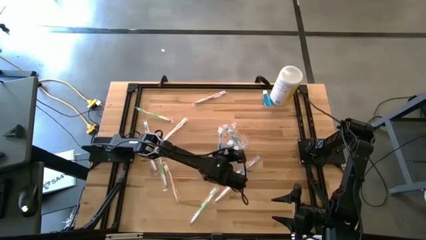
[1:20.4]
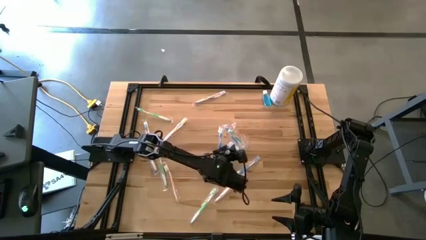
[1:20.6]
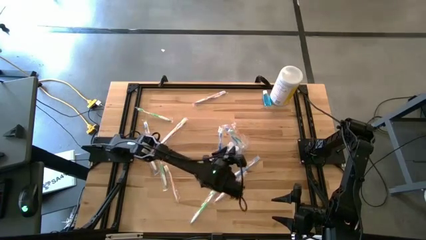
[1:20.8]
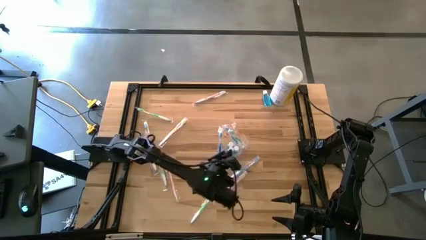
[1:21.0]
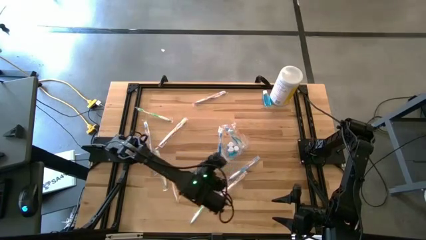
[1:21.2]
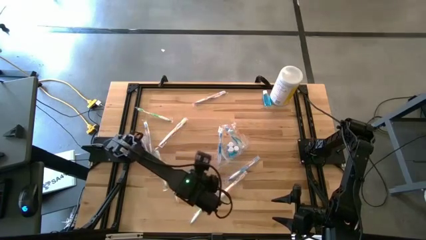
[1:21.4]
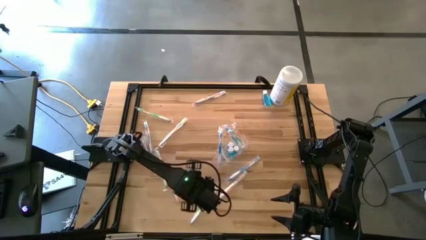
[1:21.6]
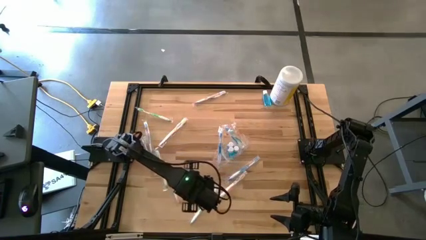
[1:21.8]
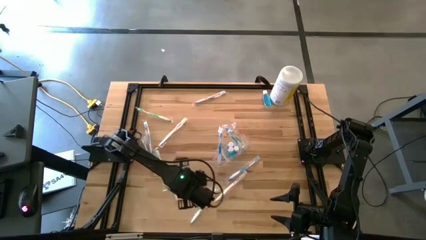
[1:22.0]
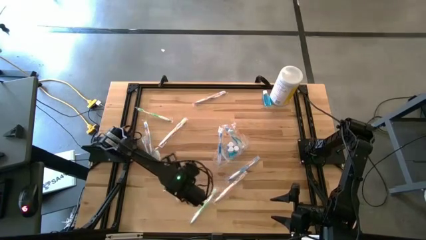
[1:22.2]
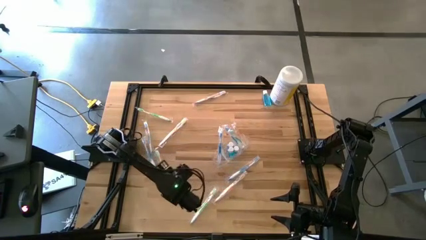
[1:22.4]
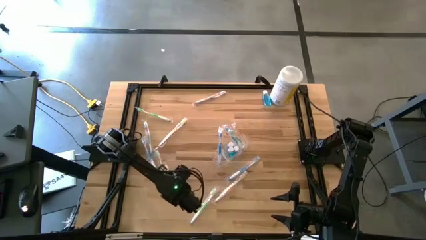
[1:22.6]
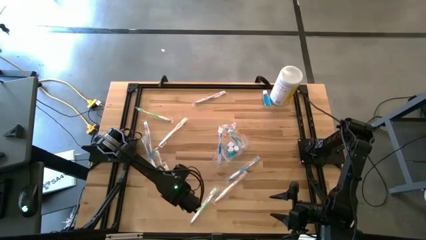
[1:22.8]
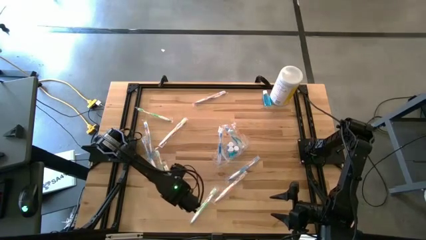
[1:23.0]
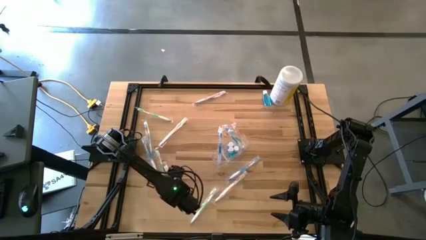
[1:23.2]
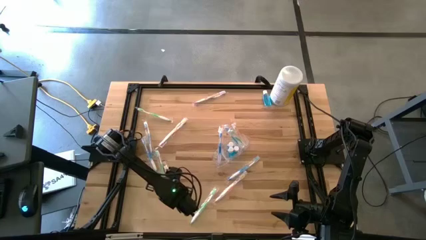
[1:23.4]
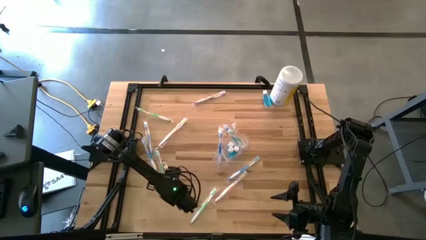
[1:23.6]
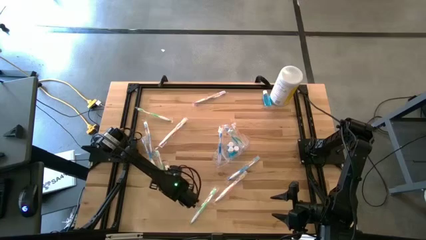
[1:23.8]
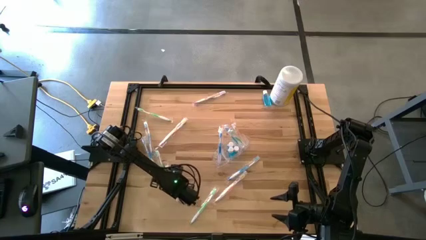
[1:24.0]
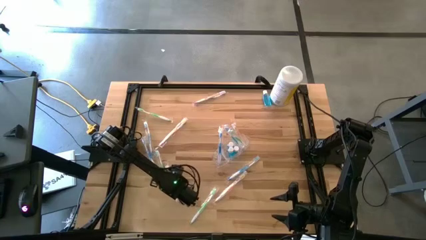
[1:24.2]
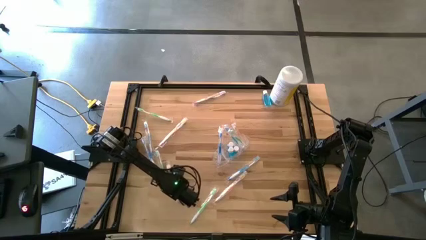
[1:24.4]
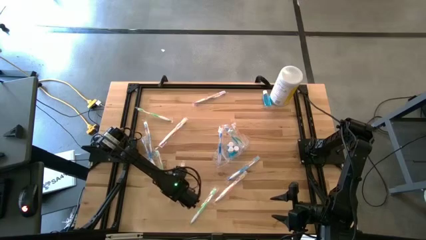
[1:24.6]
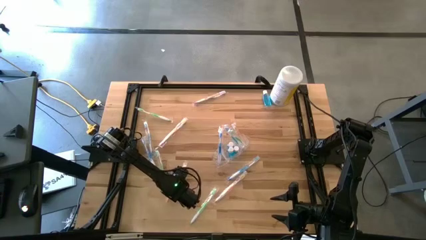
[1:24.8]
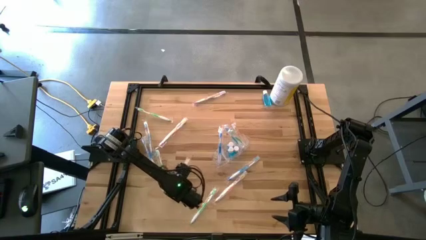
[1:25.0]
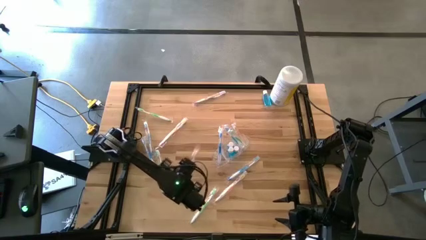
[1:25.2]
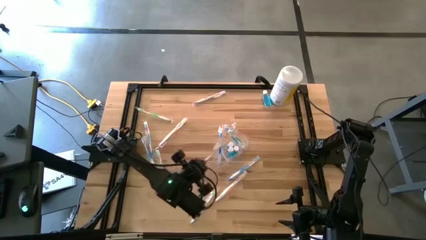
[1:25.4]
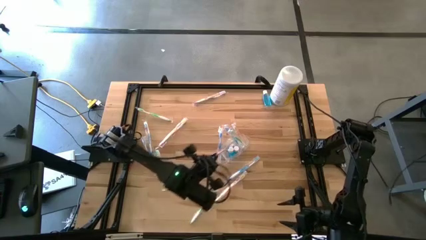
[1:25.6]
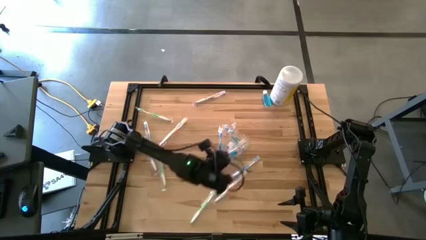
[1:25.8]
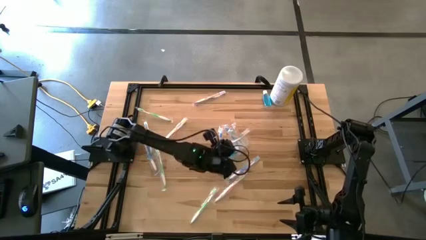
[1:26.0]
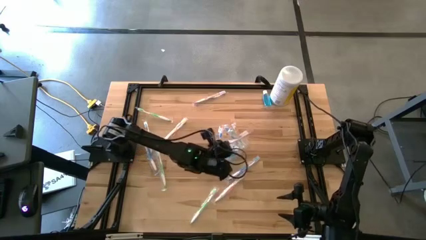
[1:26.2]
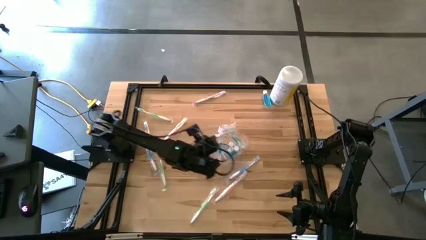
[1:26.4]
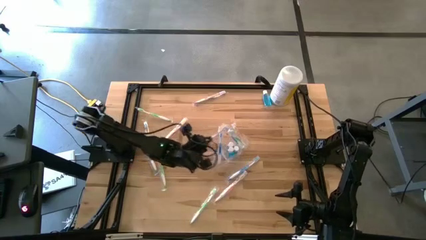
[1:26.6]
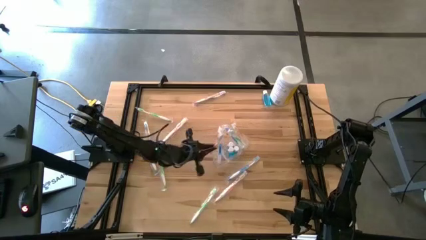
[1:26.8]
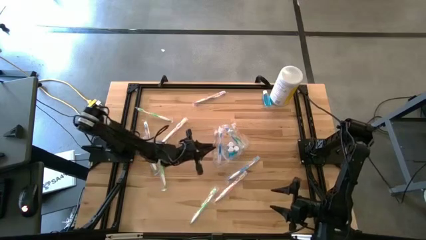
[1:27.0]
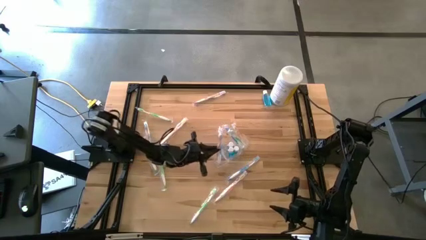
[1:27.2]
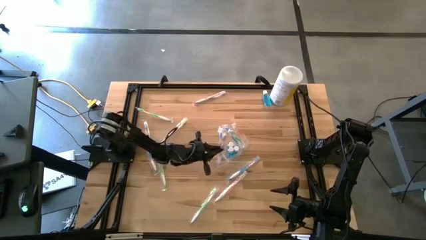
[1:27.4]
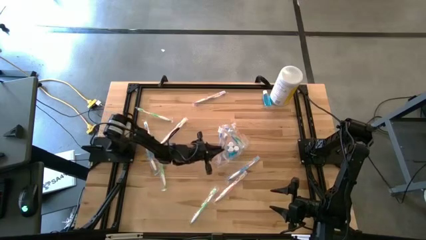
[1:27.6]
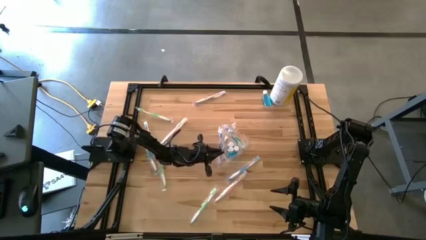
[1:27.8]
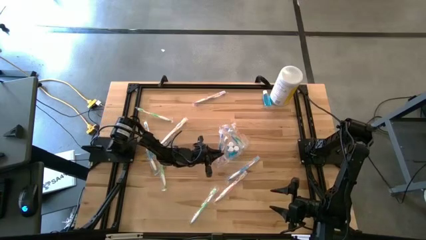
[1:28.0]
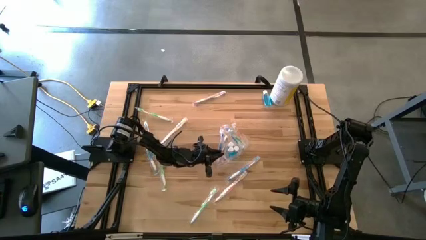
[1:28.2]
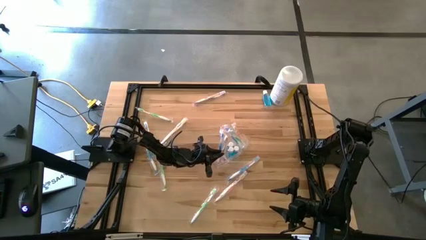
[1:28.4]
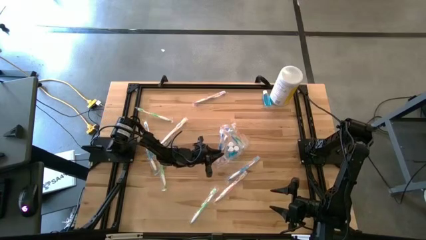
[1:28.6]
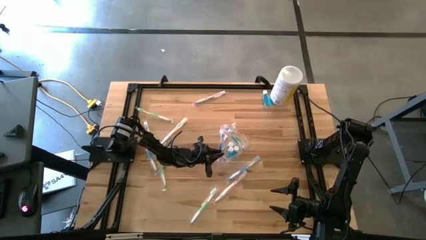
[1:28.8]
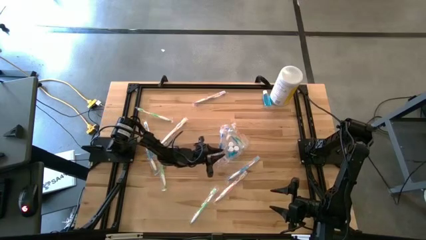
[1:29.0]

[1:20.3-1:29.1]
Task: Pick & Place toothbrushing station
Put the orange toothbrush into the transparent organizer

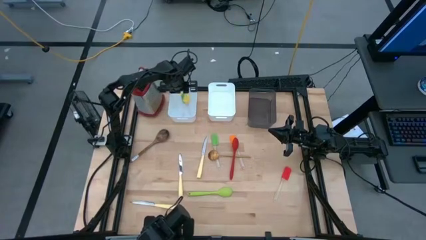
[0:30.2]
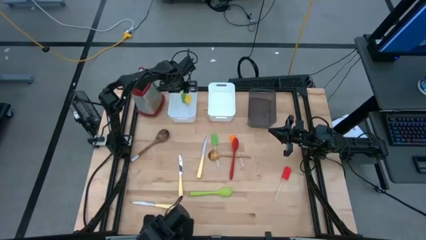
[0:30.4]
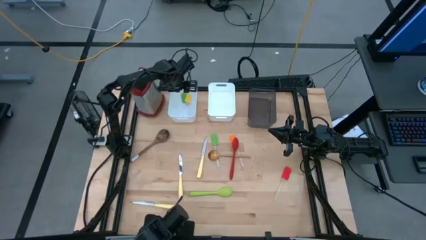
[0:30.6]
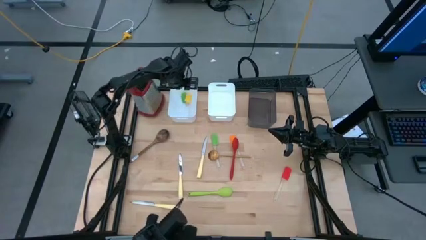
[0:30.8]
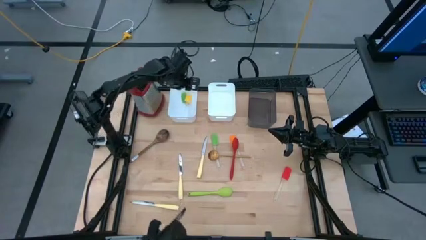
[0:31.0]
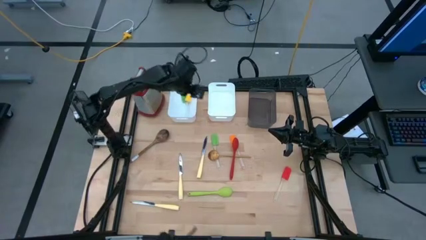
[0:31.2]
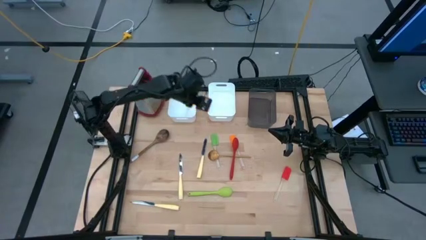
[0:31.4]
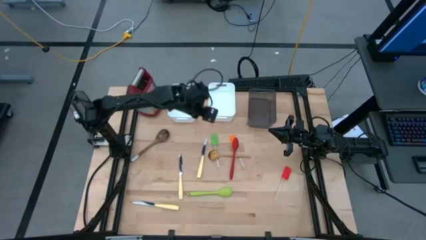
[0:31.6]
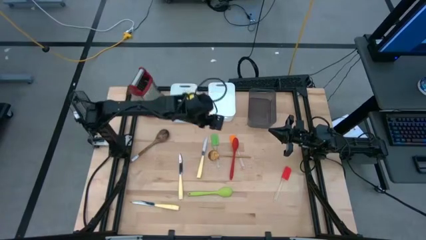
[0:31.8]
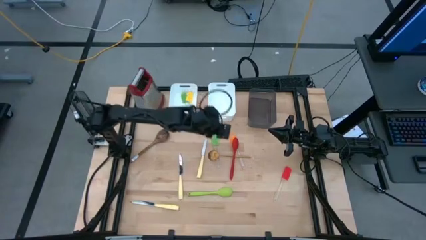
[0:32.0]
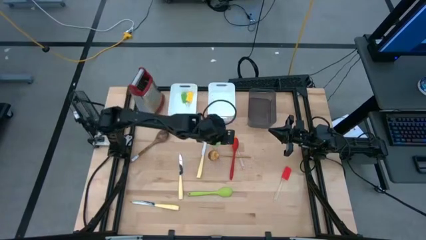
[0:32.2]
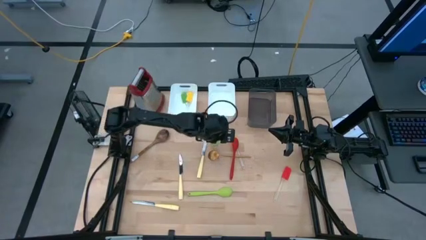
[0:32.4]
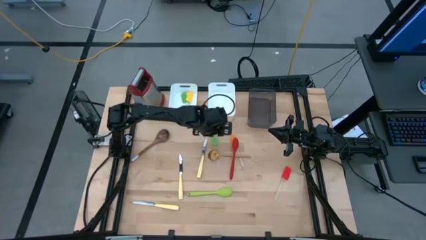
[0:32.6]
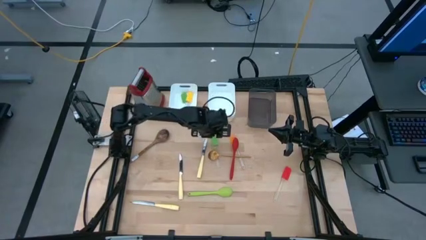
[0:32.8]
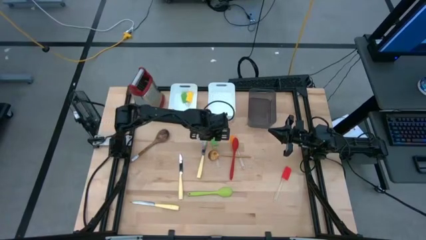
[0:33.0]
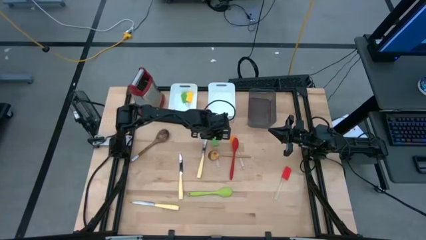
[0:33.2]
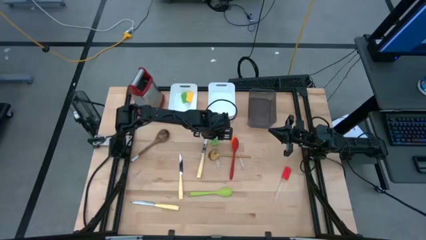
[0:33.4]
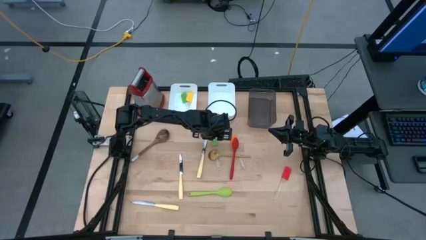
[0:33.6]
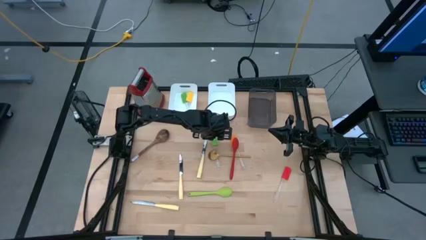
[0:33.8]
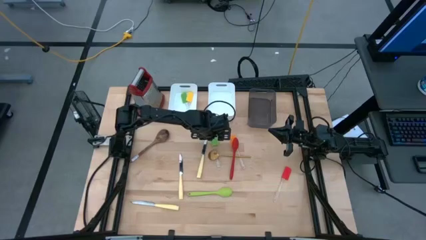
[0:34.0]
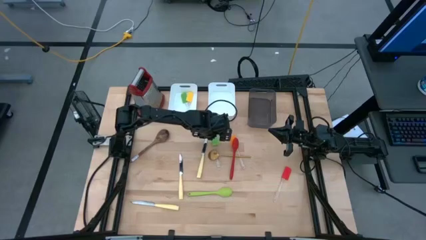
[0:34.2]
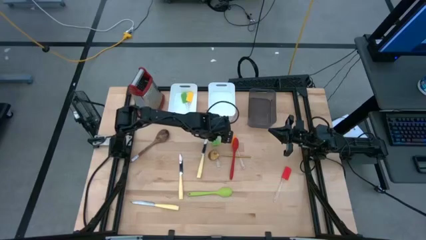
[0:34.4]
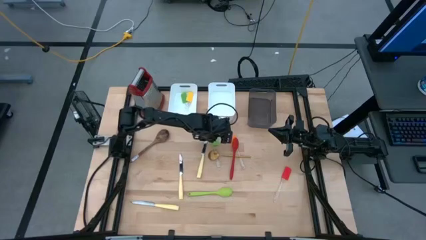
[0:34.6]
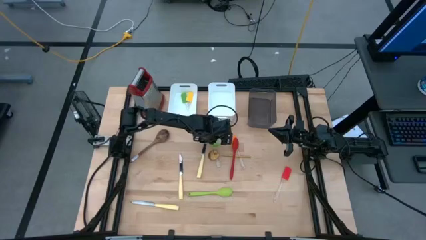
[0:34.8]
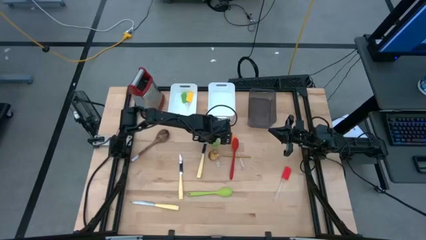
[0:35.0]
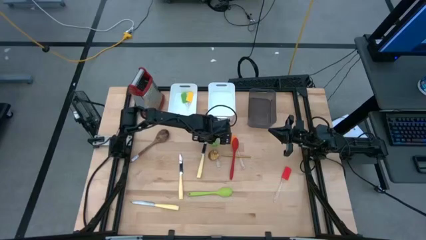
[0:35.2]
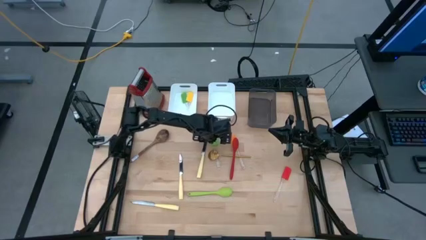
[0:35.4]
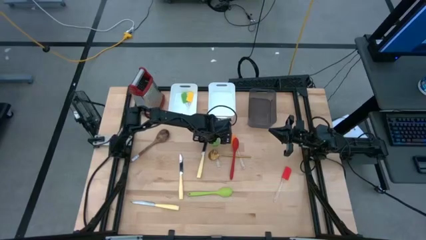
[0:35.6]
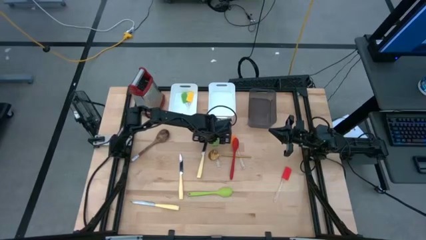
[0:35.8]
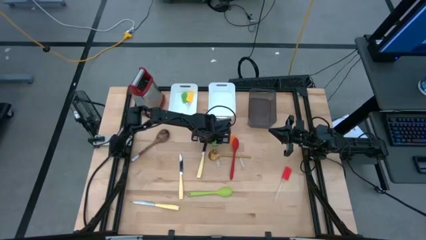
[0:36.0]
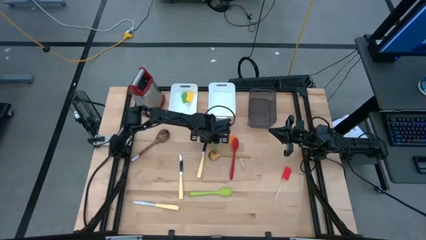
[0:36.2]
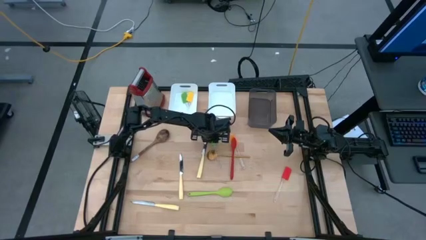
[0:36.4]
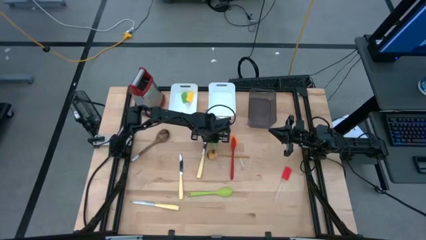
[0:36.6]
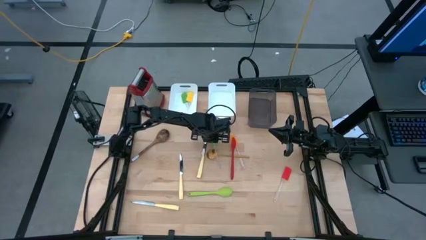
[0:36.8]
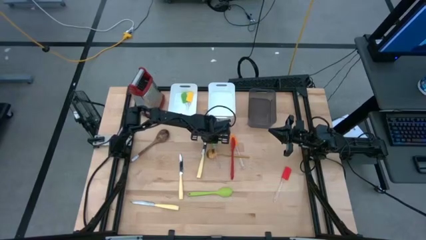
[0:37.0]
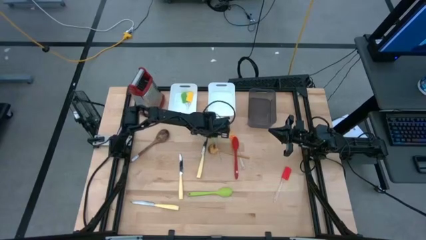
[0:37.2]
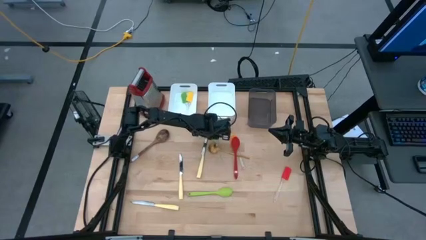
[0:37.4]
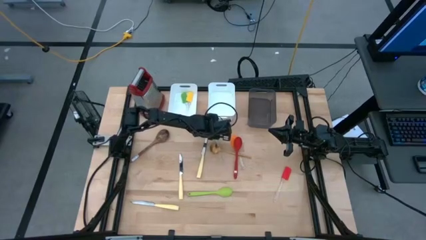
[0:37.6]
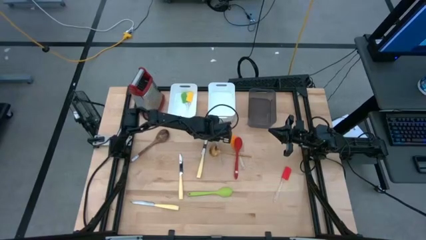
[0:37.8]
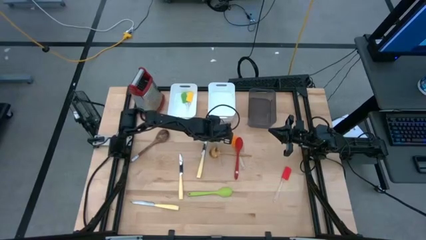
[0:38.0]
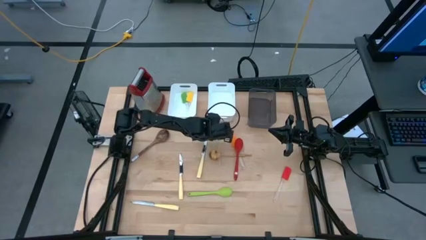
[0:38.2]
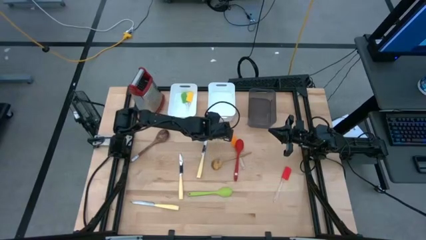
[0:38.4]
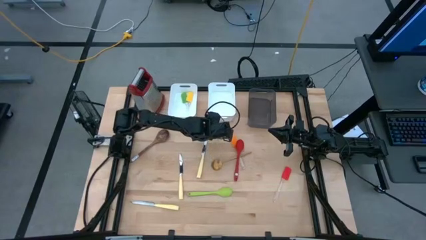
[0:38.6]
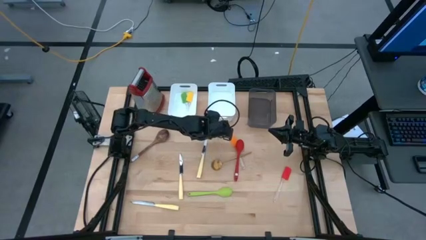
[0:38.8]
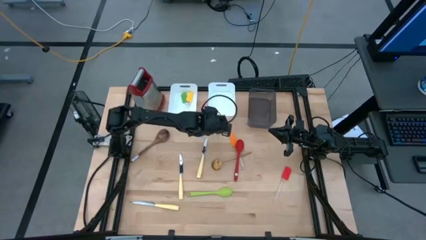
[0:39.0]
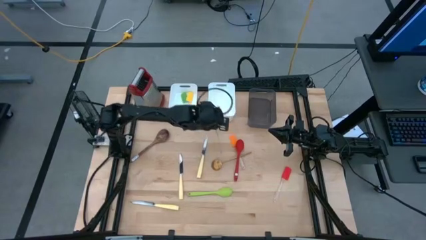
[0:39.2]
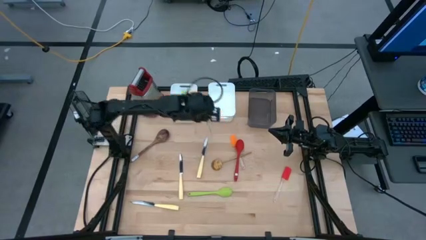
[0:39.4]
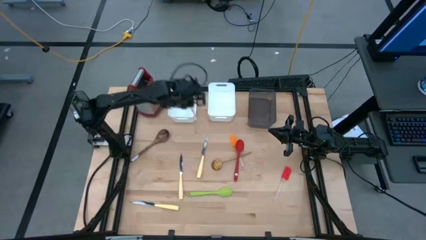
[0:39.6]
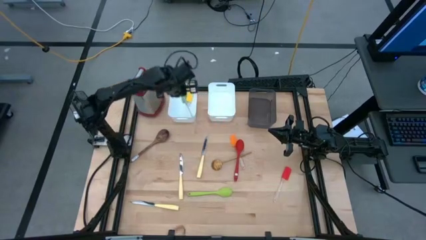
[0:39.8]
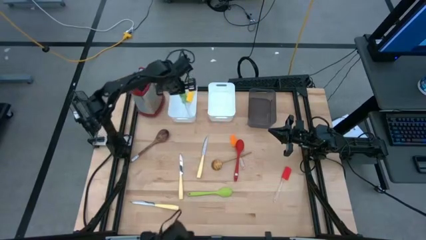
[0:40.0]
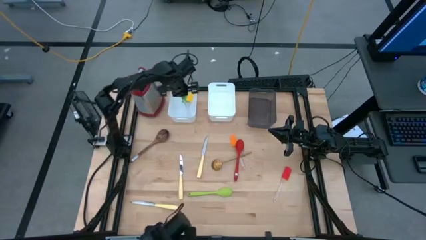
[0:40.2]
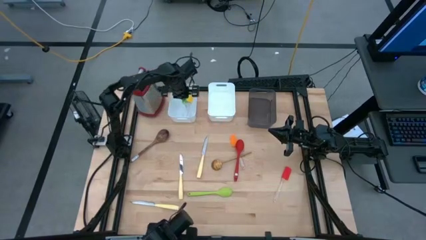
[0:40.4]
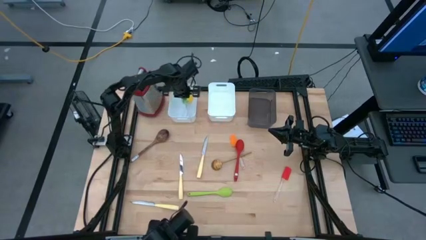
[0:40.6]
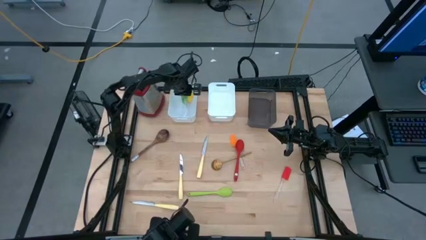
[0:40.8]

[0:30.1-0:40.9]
Task: Pick & Place Kitchen Items
Put the green spatula into the left white bin
